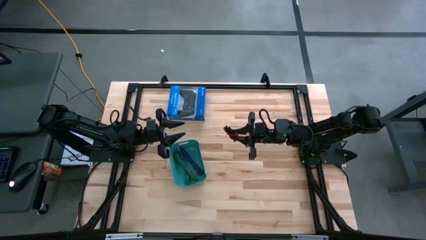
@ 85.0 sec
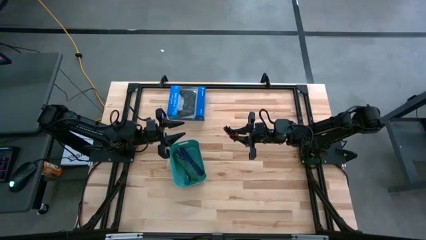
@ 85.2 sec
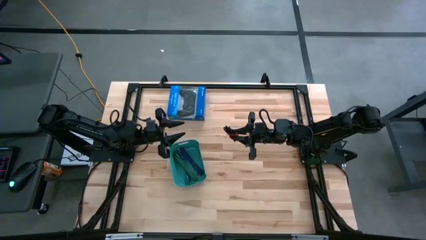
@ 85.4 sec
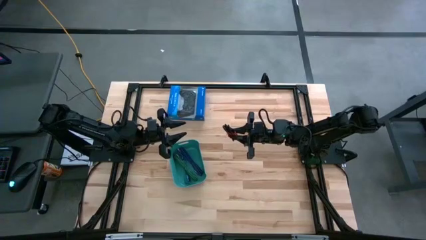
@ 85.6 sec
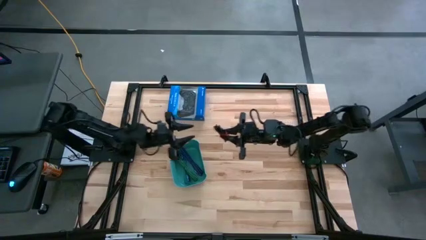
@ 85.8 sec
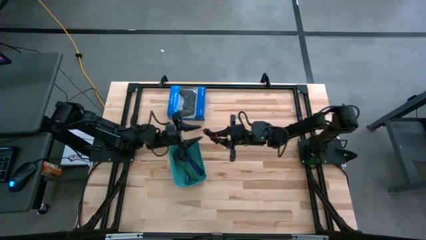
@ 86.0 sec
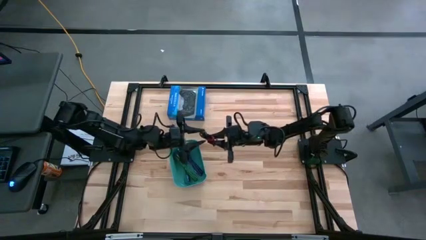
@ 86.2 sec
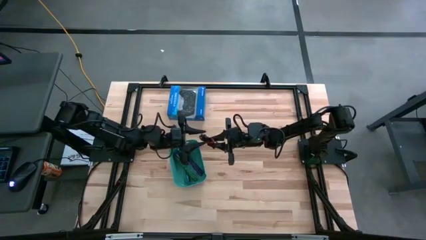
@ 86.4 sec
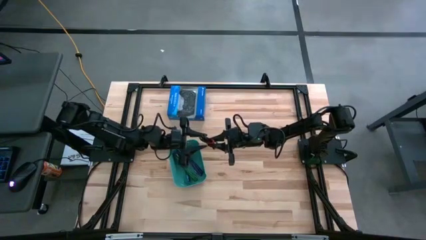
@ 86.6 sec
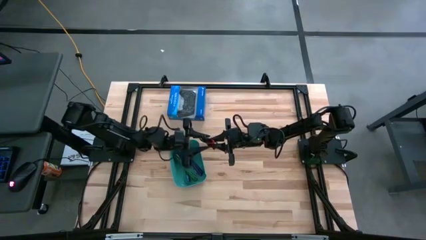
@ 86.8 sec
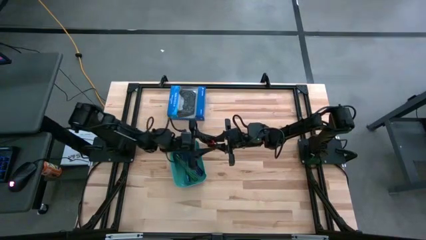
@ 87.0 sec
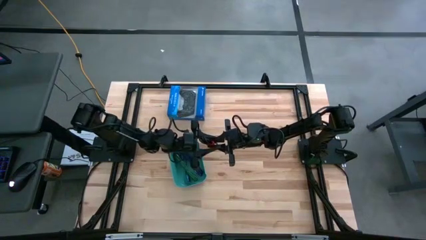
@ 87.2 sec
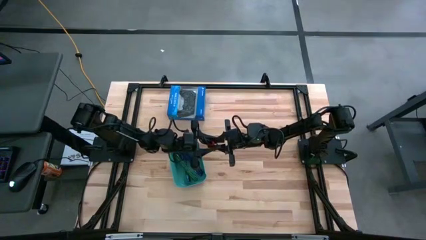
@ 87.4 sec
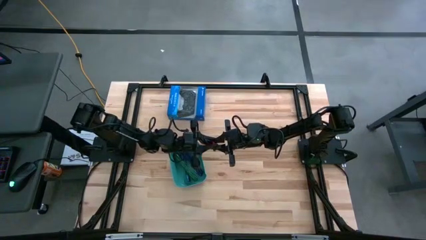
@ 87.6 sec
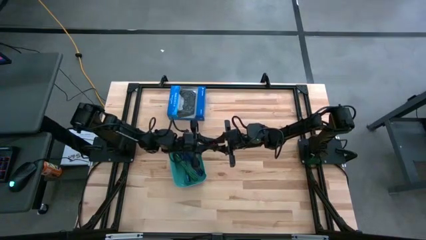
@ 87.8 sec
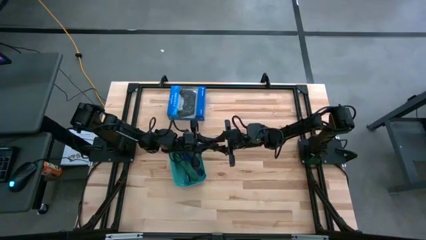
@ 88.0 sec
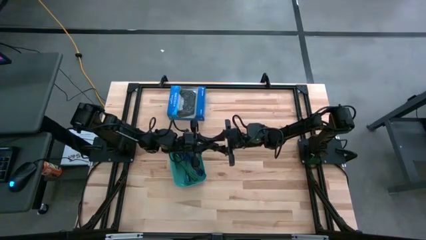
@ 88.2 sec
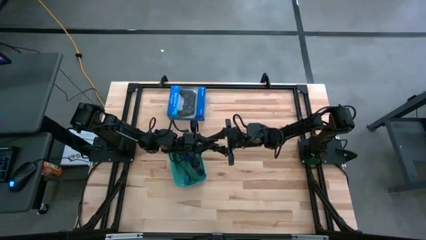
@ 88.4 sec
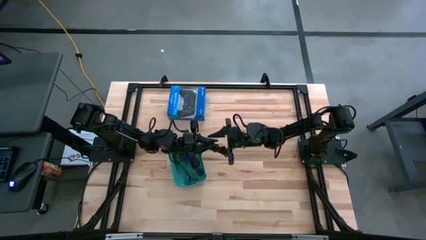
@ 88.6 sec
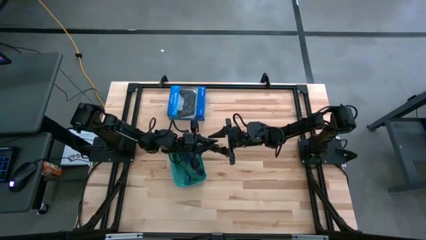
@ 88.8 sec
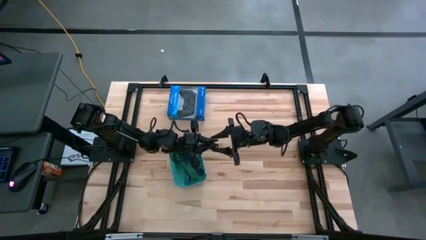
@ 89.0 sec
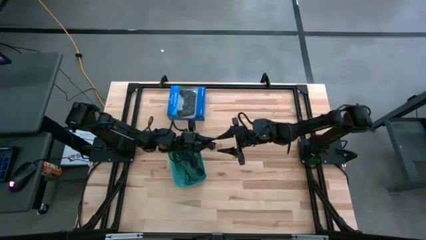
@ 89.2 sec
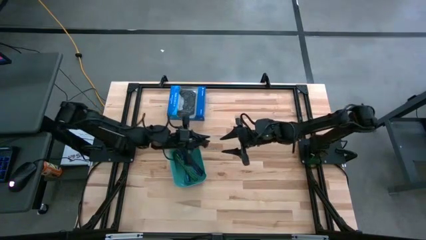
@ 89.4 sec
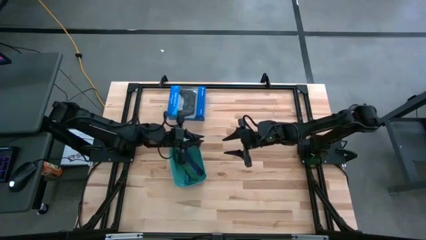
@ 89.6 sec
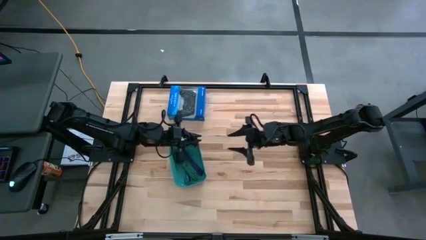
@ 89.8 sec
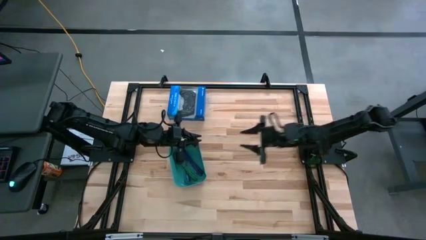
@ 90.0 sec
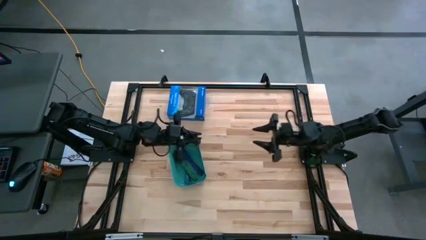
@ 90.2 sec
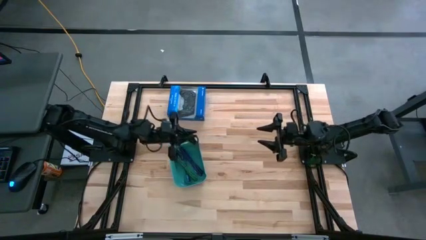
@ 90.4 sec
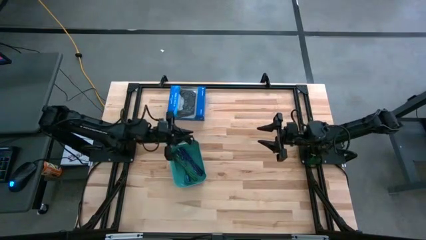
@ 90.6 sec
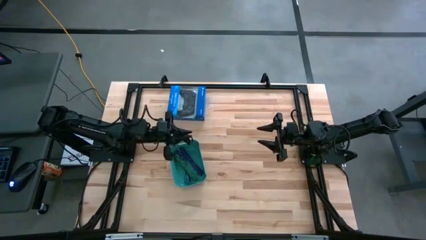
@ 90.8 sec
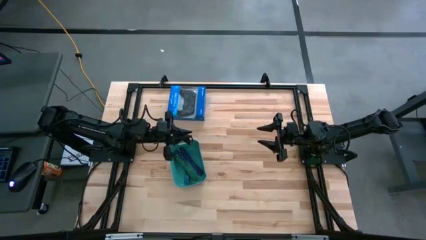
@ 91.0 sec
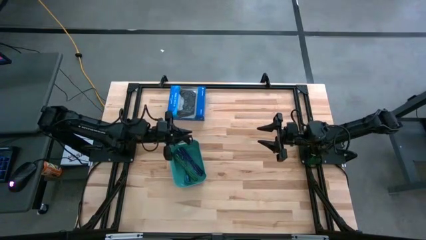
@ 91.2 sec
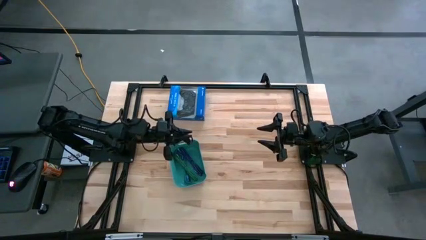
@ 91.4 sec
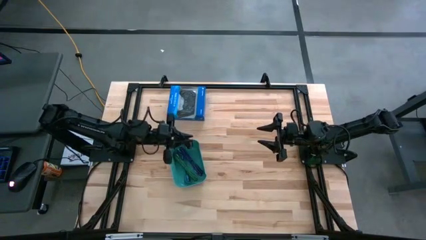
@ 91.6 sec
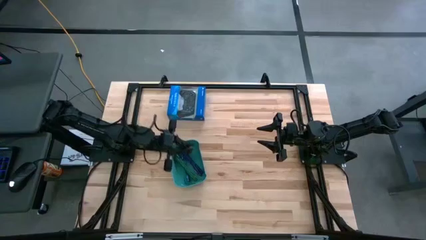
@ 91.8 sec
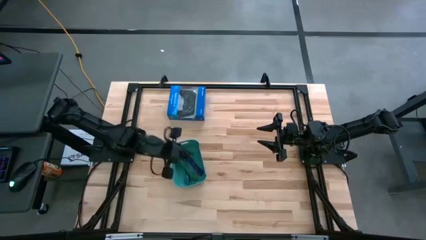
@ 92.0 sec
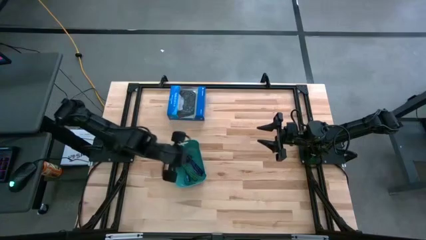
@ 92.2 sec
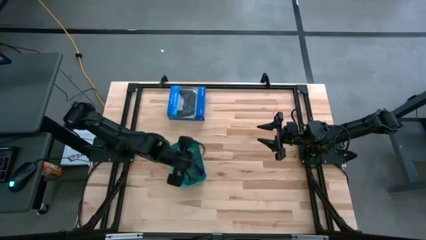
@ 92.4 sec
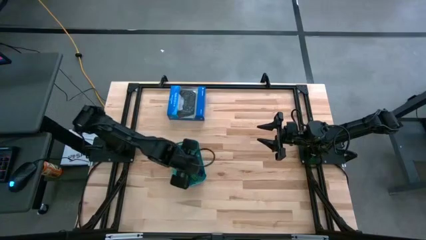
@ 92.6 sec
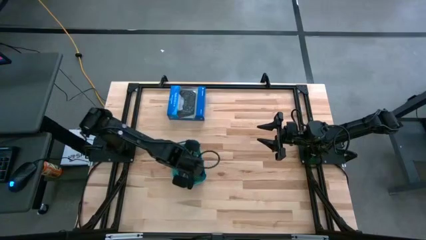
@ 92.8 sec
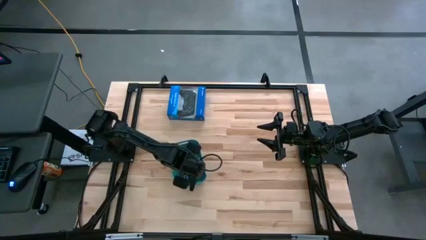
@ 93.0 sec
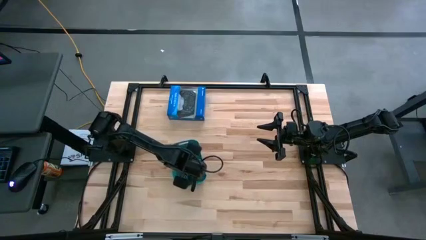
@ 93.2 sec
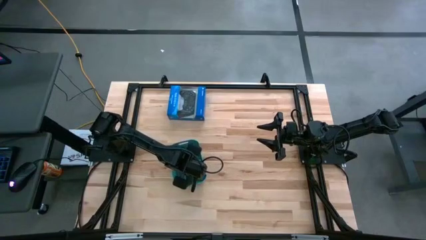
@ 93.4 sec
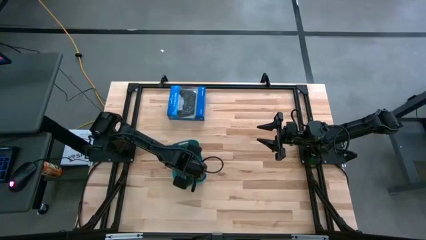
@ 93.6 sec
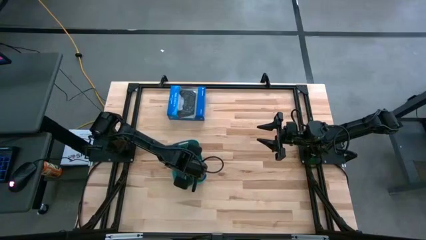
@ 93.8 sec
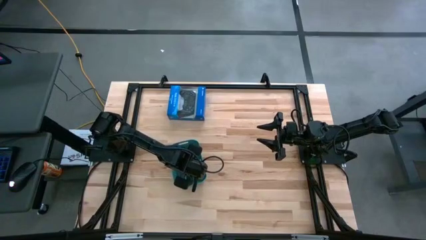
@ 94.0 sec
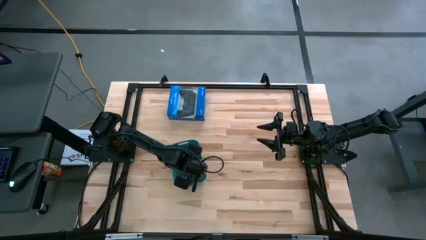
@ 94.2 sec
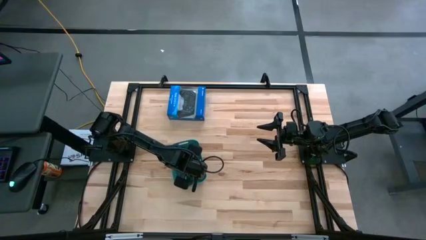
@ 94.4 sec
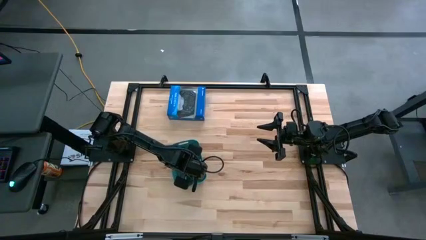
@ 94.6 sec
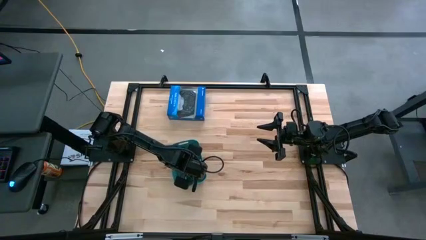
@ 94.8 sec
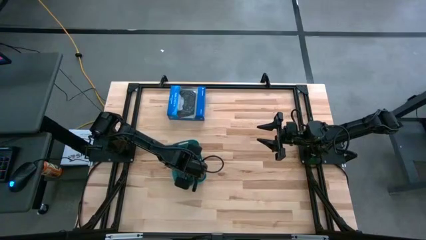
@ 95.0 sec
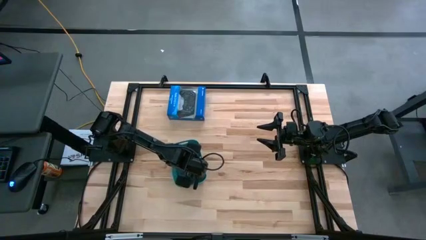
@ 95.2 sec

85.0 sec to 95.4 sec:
Task: Pick and place USB-C Cables
Put the black charger cable into the green bin
